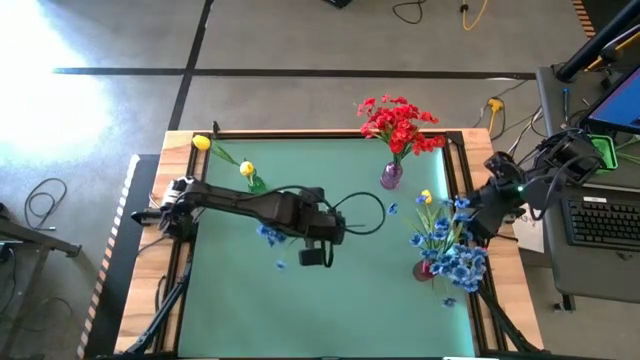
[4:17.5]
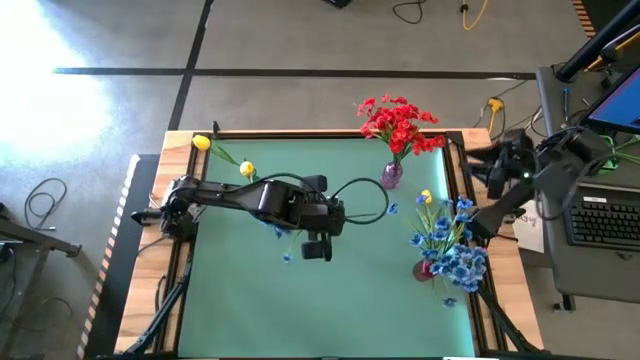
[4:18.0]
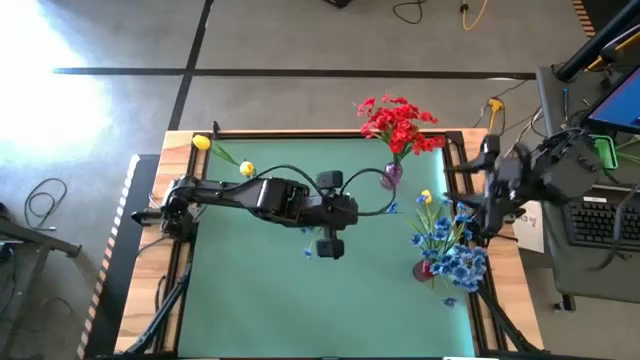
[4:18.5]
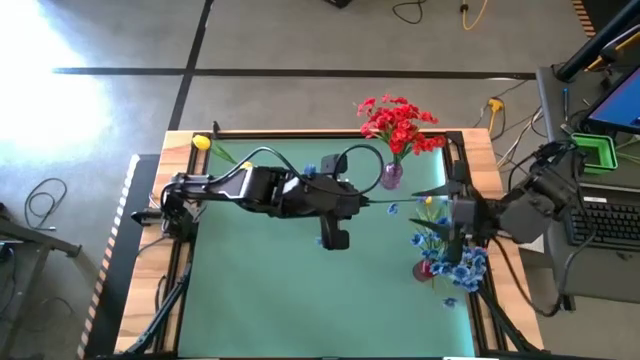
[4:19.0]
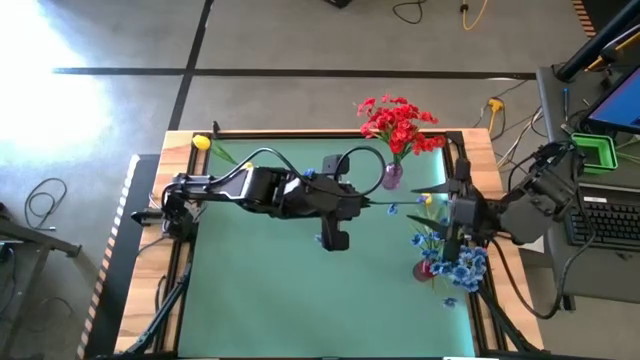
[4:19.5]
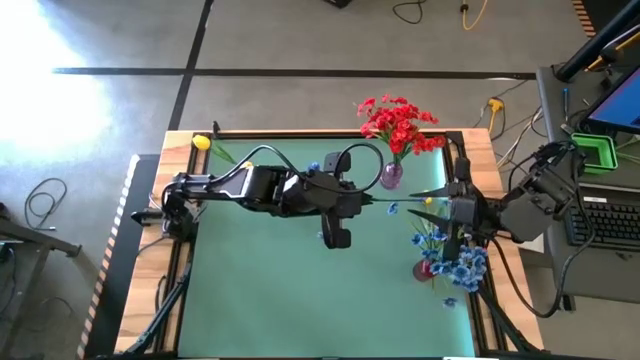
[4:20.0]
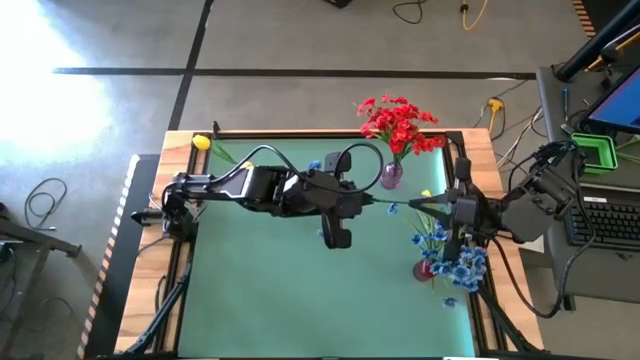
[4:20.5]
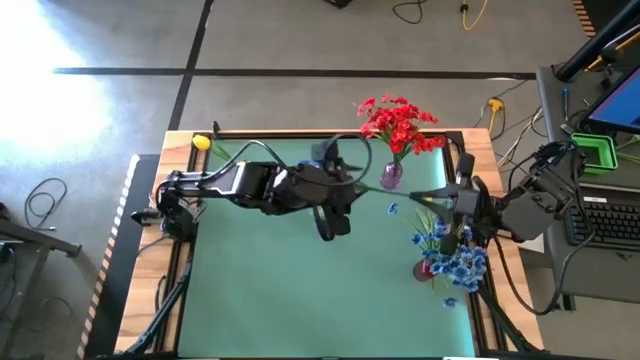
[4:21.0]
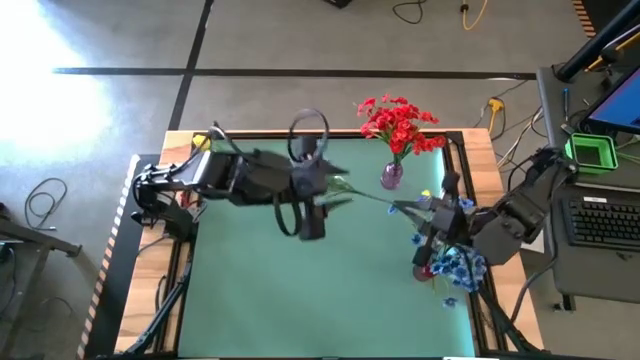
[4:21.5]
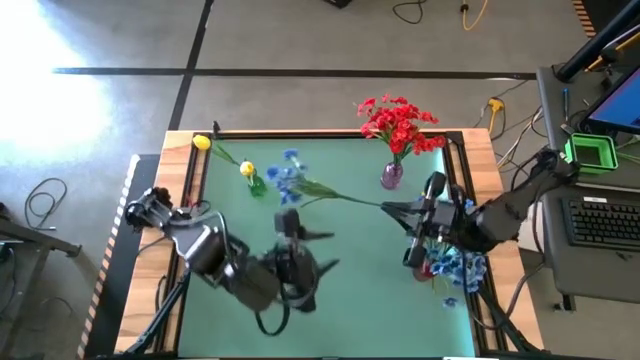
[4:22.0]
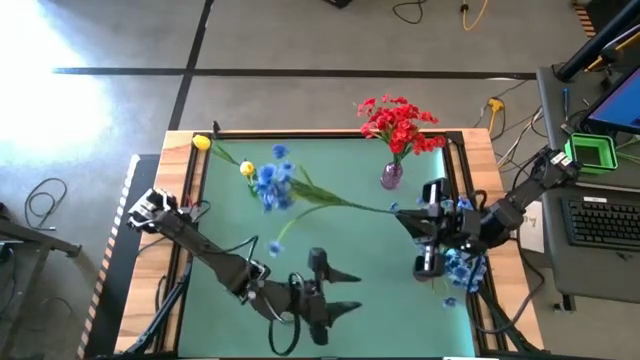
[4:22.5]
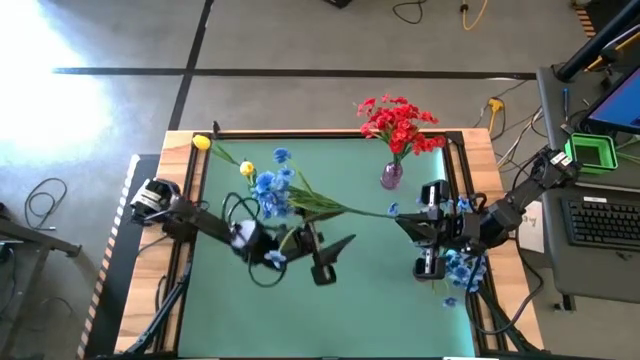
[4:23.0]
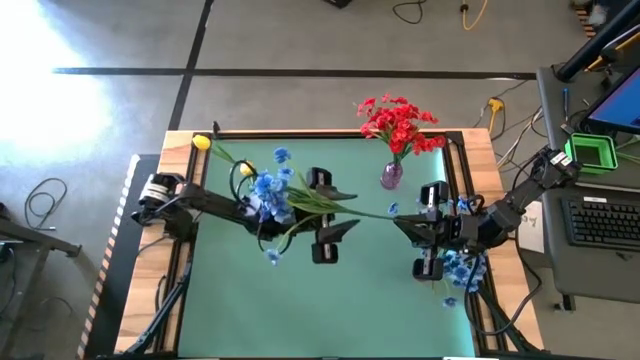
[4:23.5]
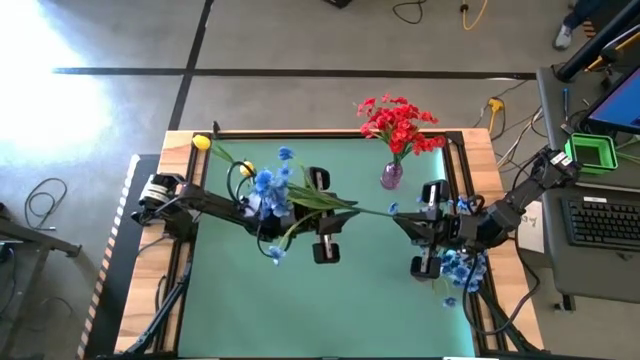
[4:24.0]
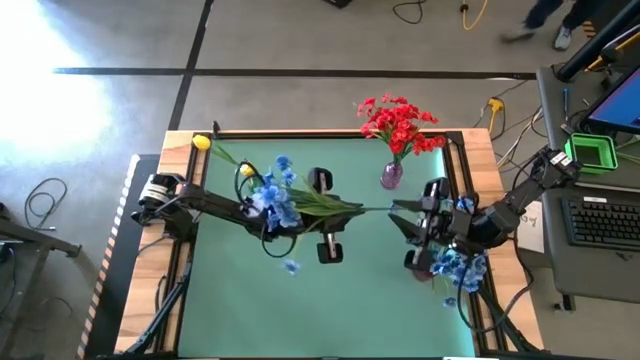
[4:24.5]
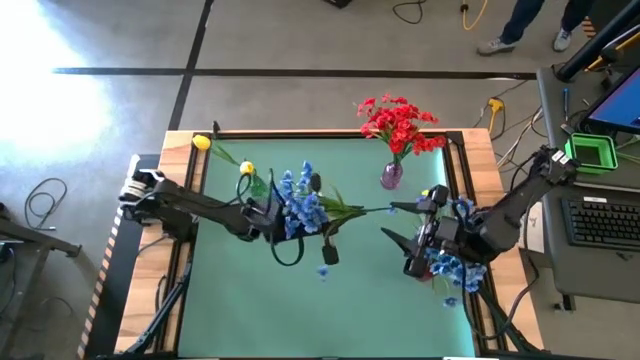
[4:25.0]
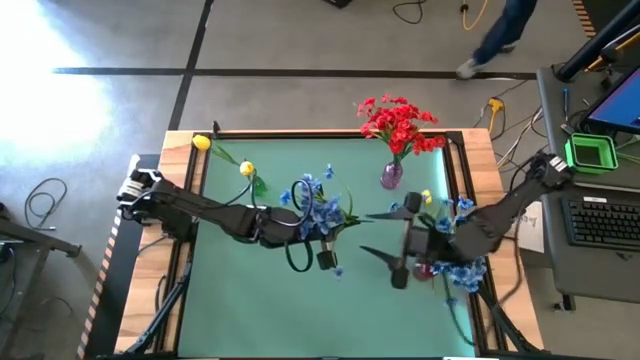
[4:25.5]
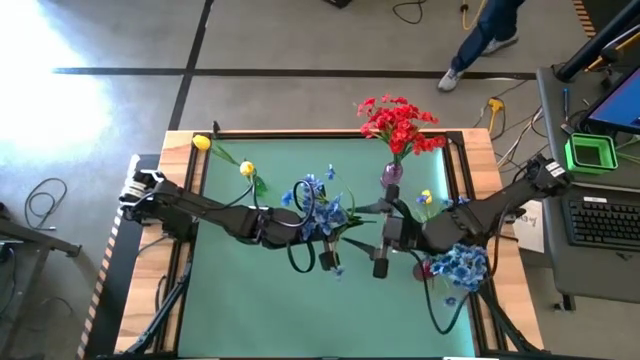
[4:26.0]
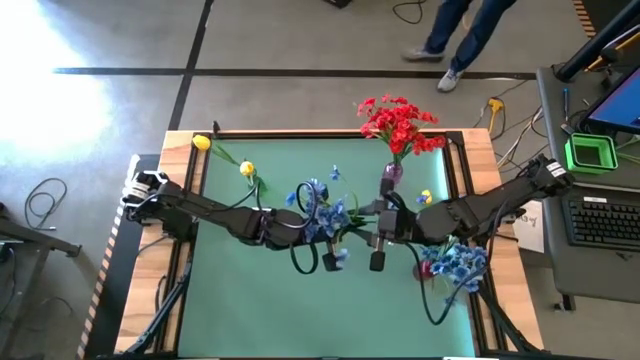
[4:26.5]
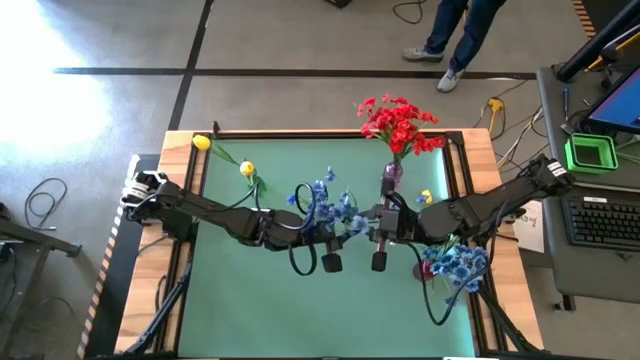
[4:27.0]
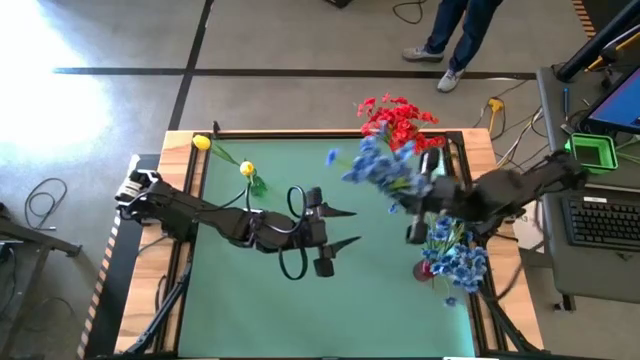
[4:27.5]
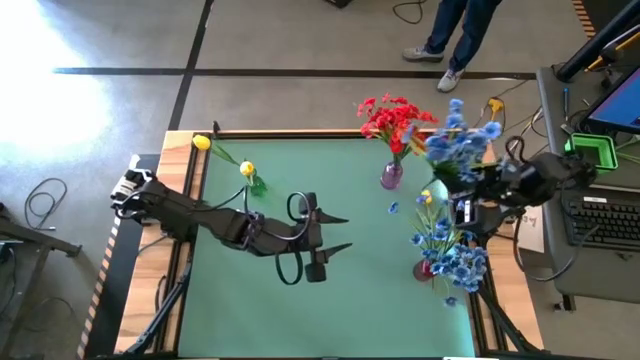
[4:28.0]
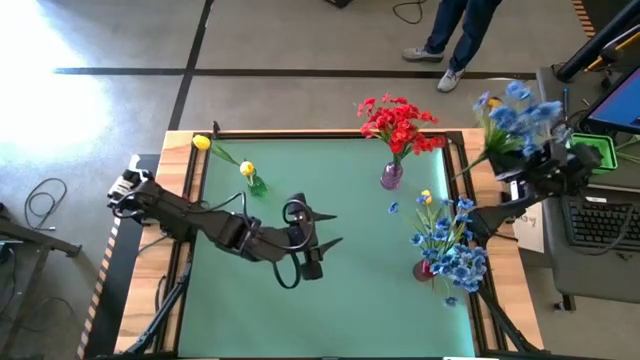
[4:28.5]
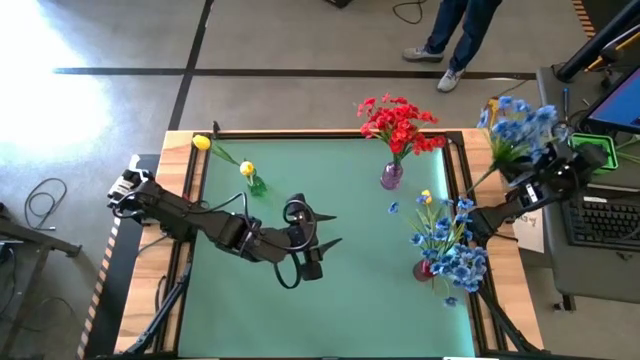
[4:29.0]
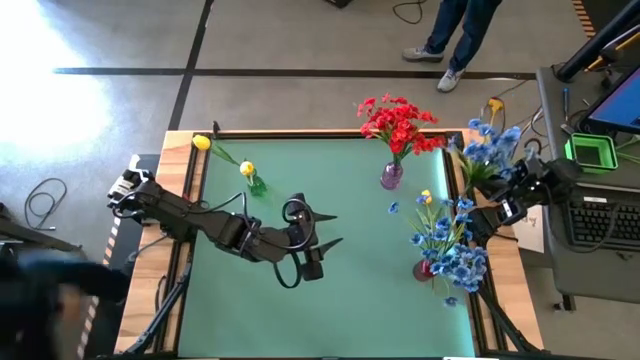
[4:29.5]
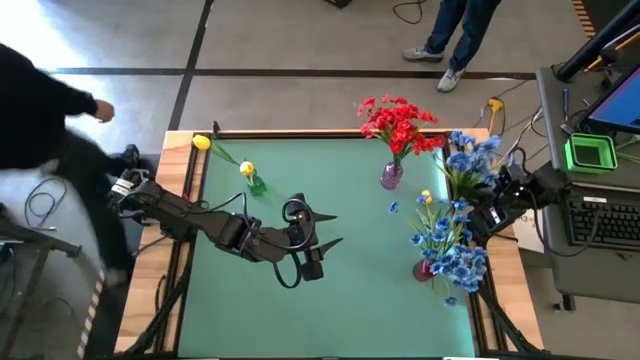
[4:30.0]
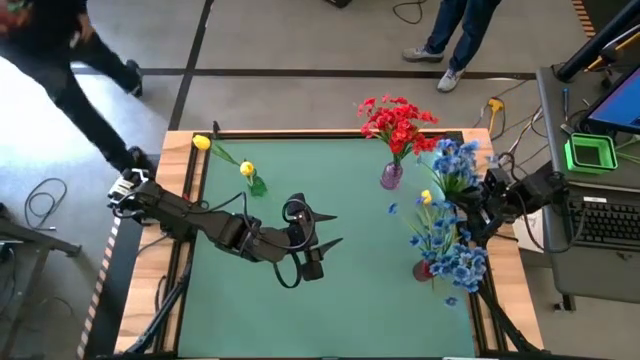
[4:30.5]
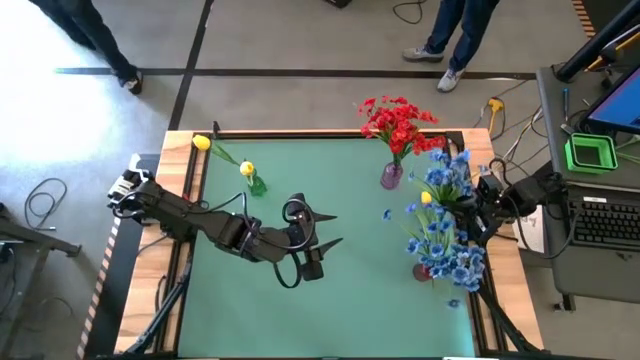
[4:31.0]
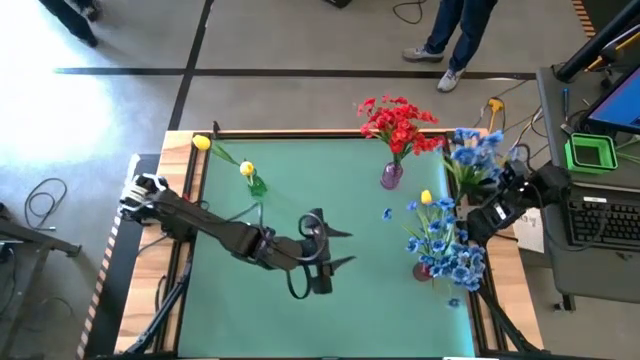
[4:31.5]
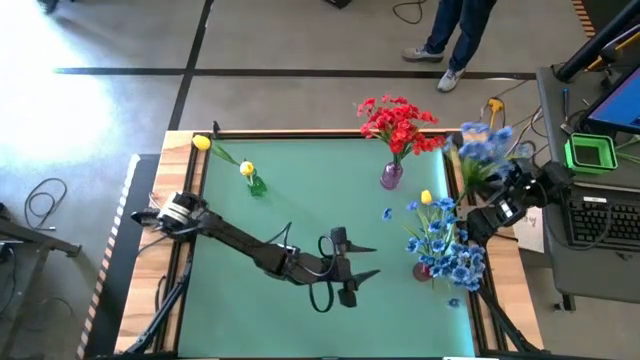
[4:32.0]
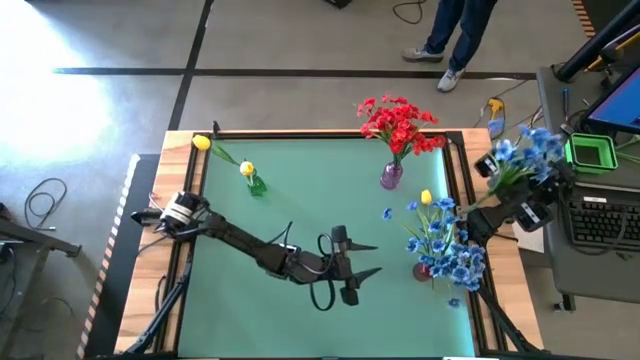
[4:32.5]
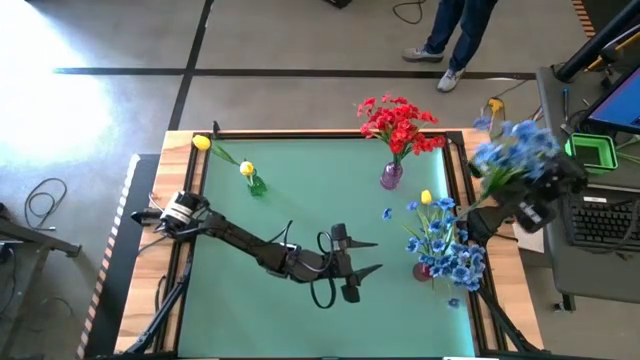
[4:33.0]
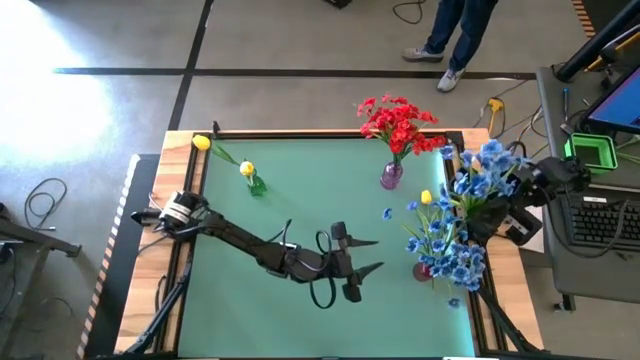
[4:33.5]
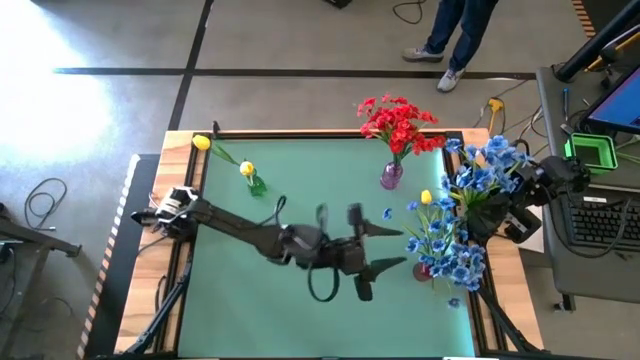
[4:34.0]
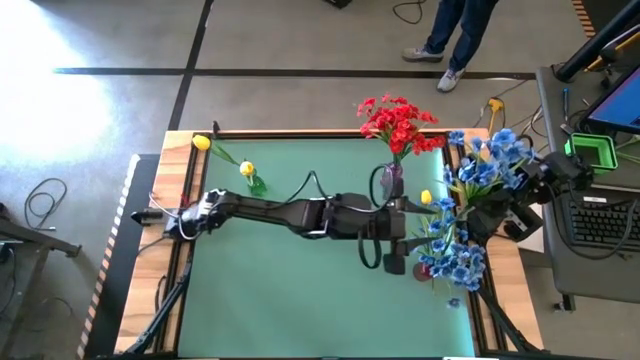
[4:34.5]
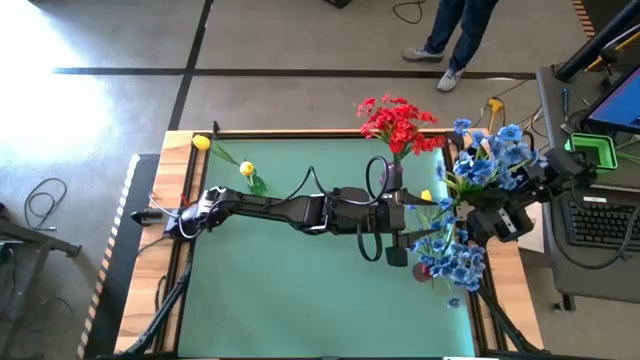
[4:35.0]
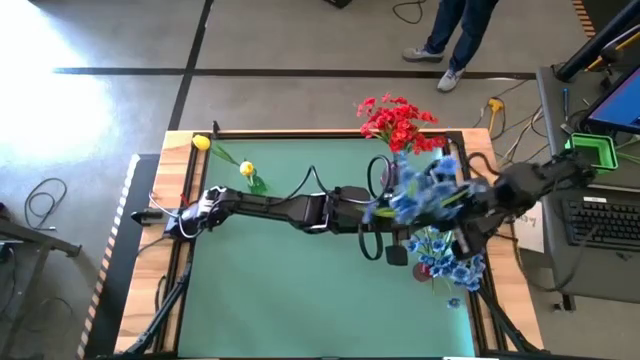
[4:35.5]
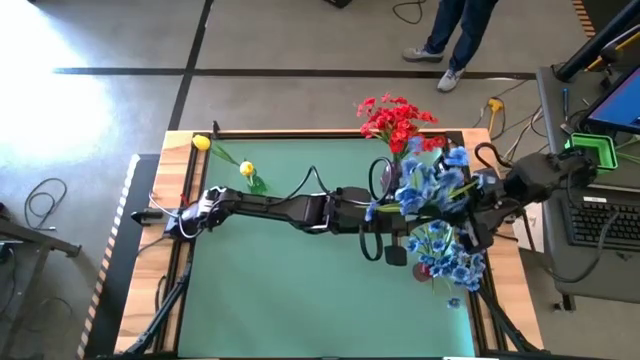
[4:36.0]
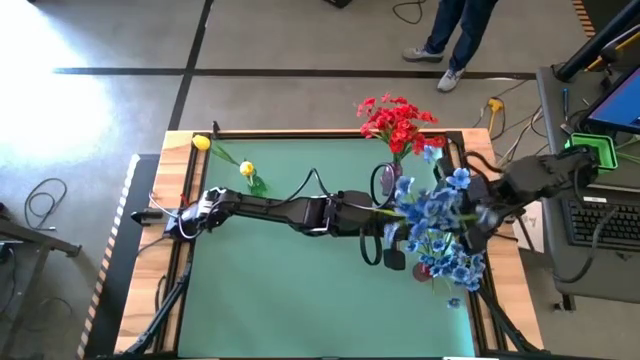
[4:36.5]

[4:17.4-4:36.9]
Task: Sort flowers into vase by color
Put the blue flower into the red vase

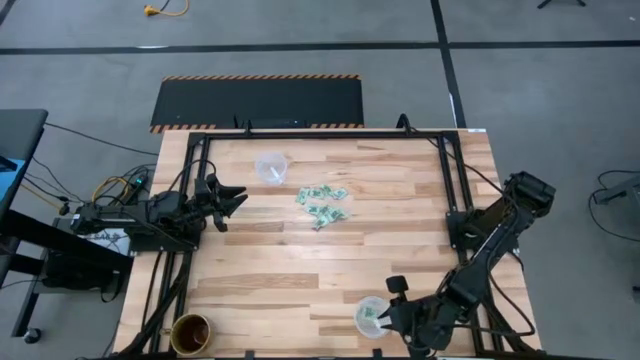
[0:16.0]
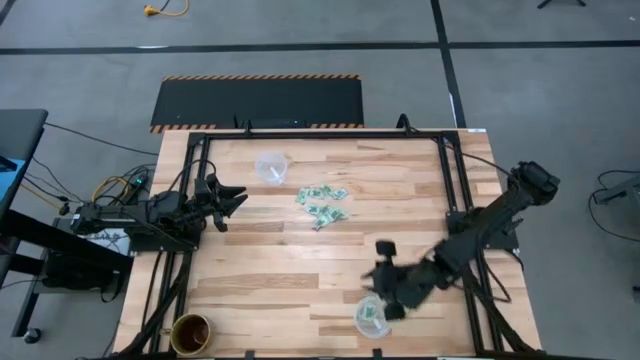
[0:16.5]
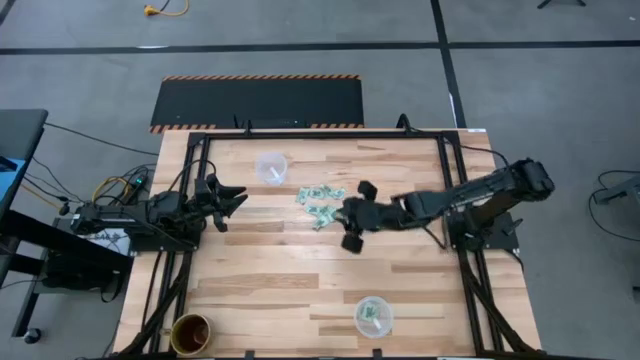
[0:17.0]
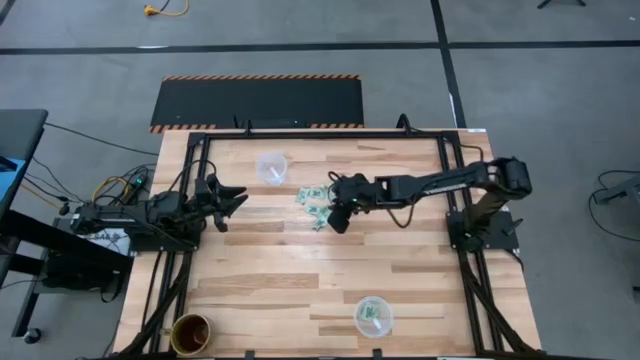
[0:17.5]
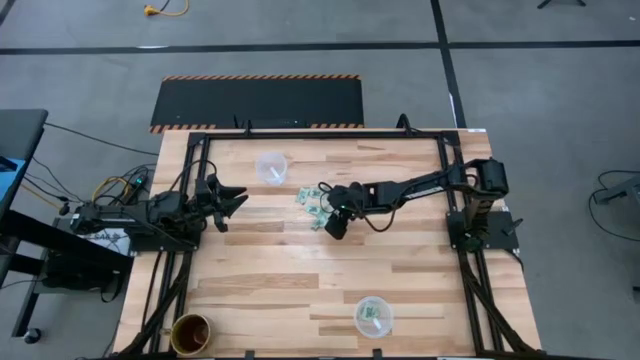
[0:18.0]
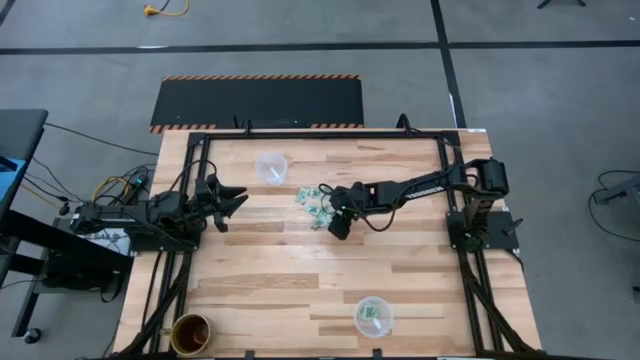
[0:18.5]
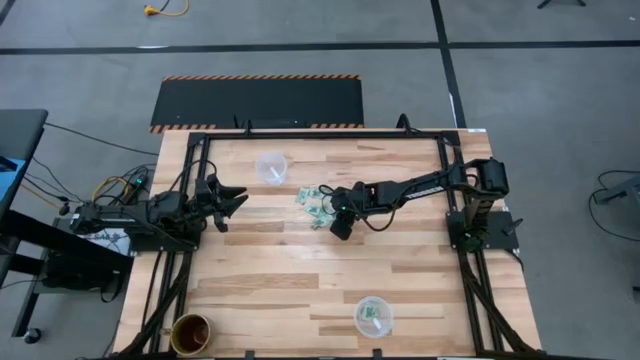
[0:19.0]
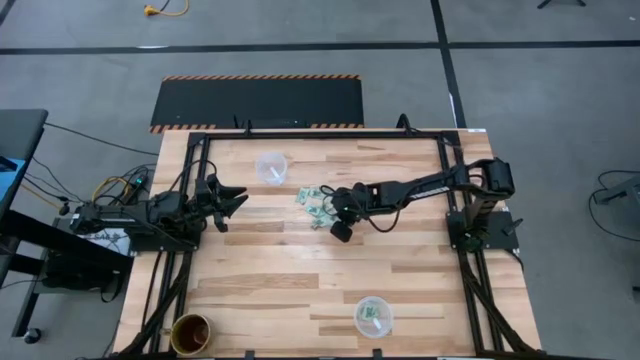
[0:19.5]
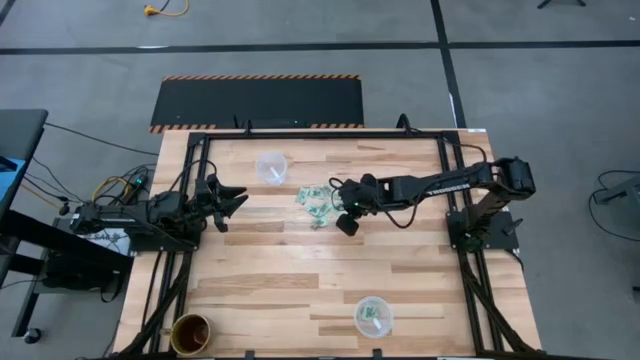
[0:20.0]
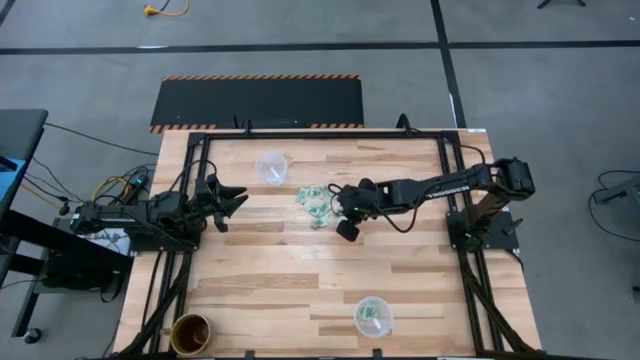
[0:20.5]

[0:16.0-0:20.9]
Task: Pick and place Stevia / Truvia into bins
Put the white stevia packet into the bottom transparent container
